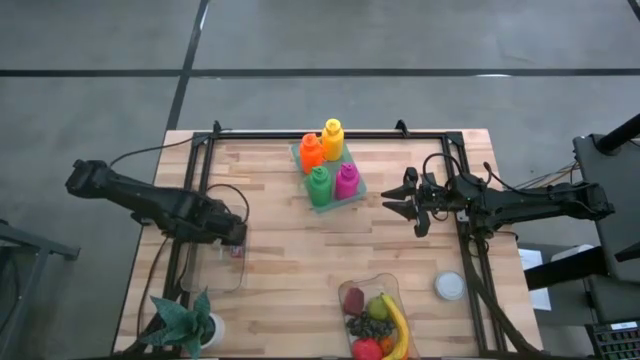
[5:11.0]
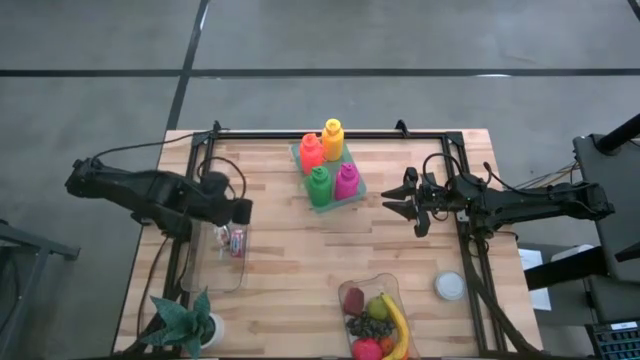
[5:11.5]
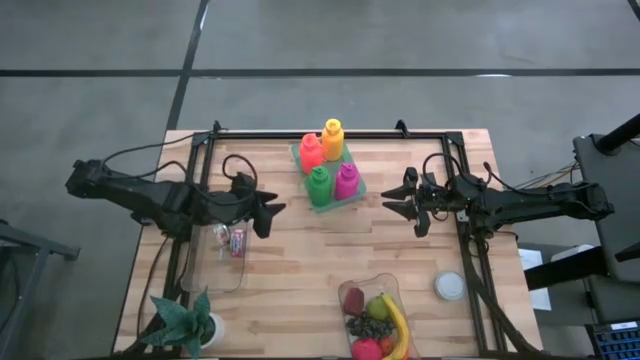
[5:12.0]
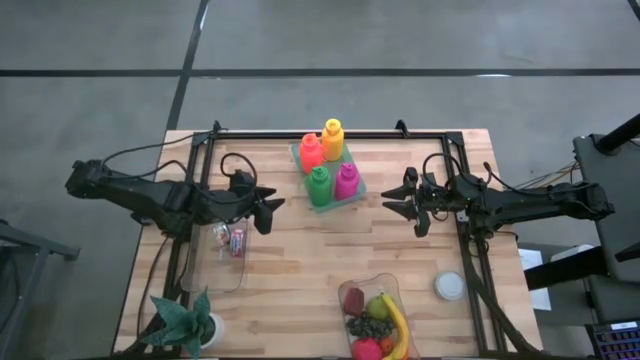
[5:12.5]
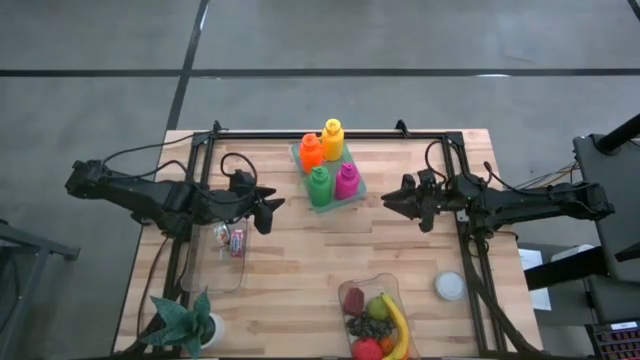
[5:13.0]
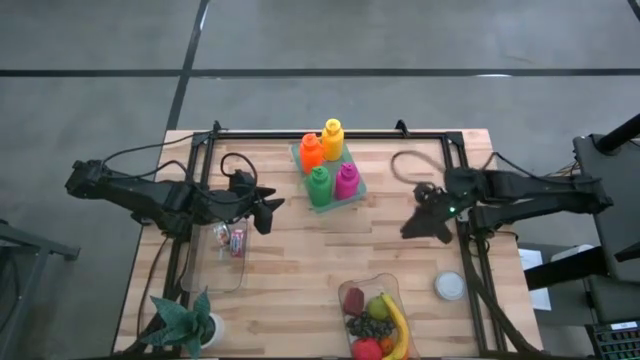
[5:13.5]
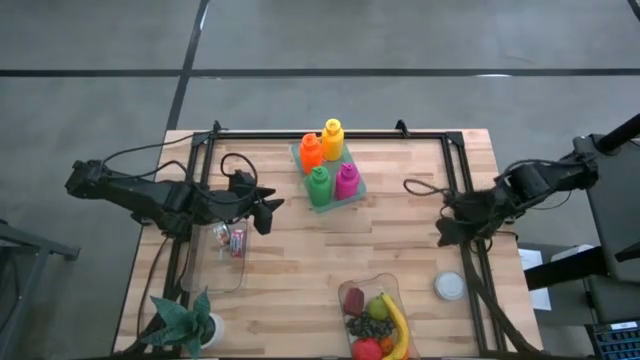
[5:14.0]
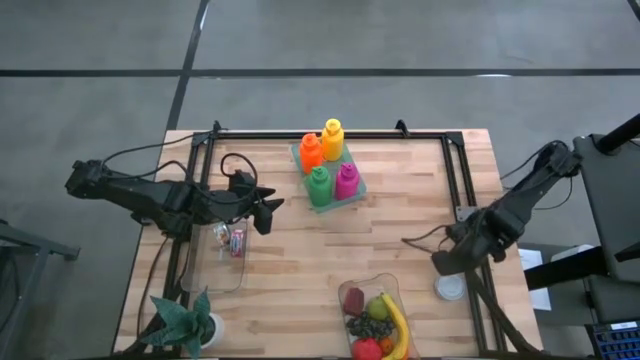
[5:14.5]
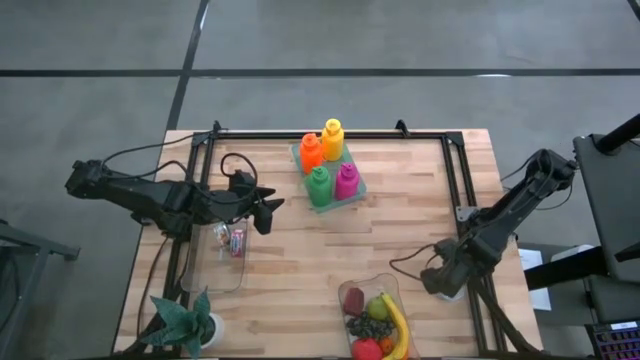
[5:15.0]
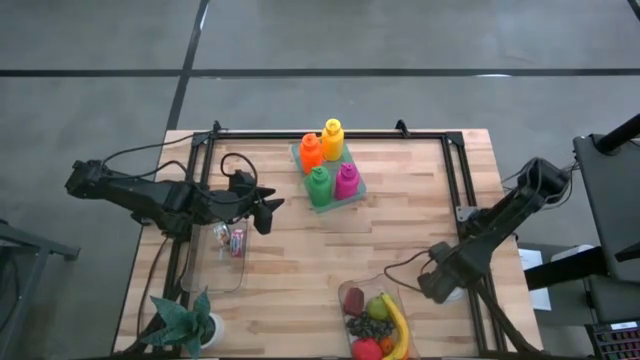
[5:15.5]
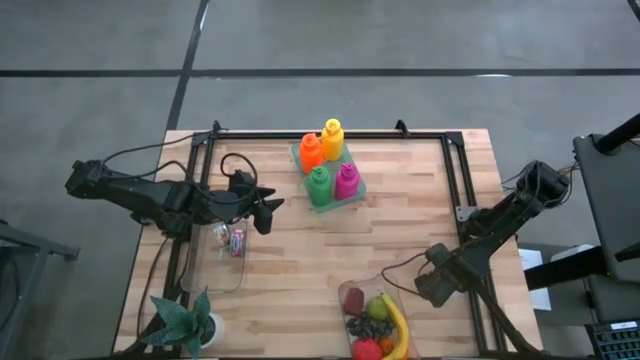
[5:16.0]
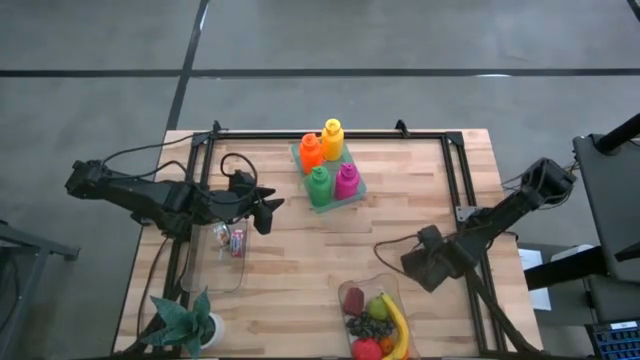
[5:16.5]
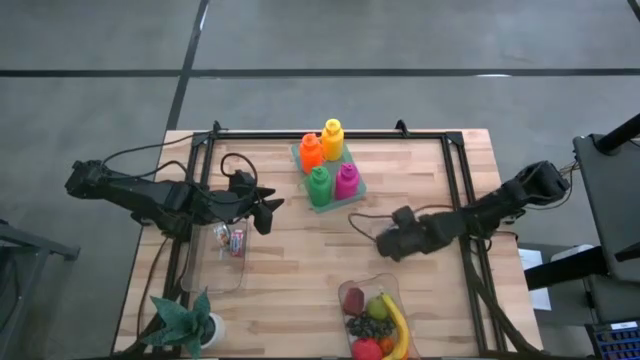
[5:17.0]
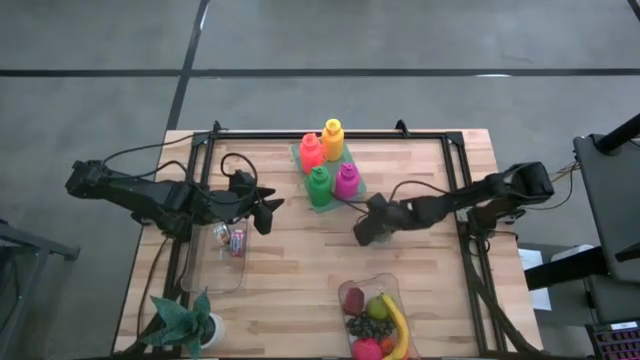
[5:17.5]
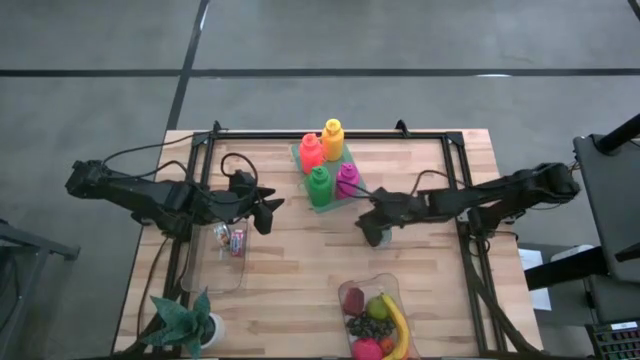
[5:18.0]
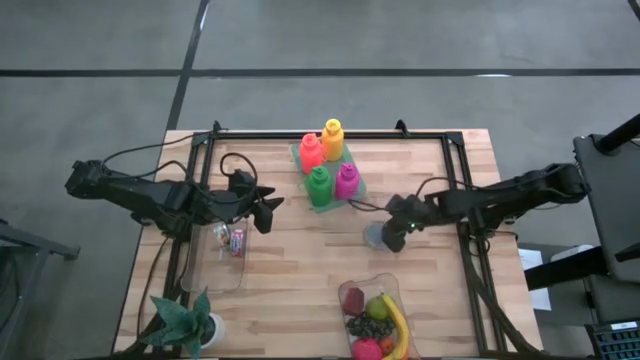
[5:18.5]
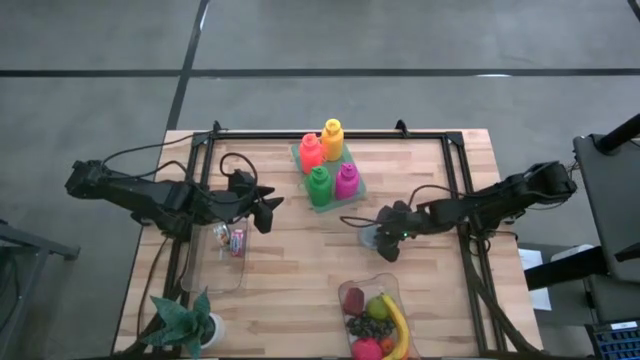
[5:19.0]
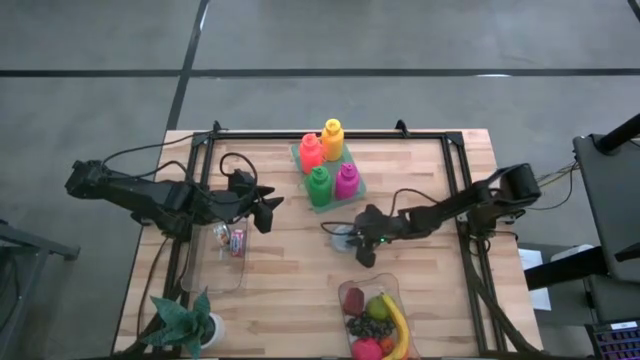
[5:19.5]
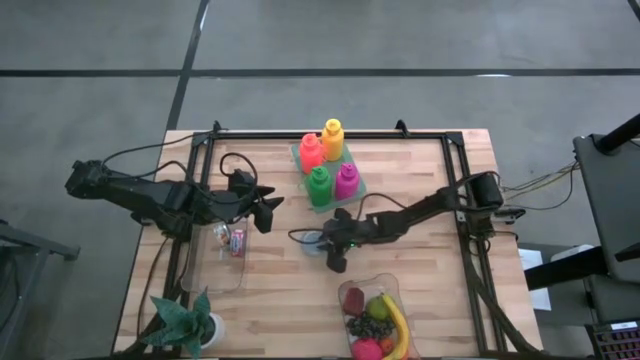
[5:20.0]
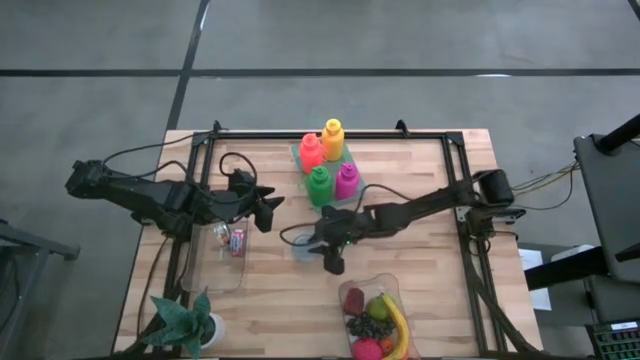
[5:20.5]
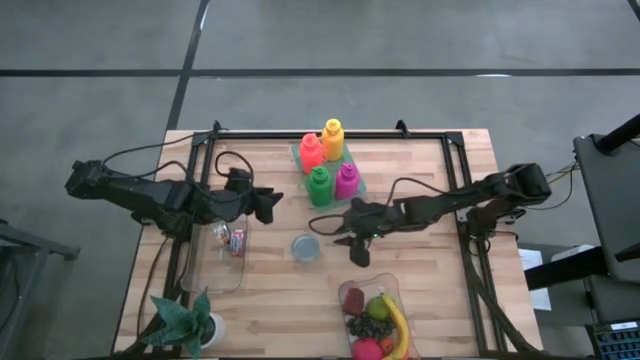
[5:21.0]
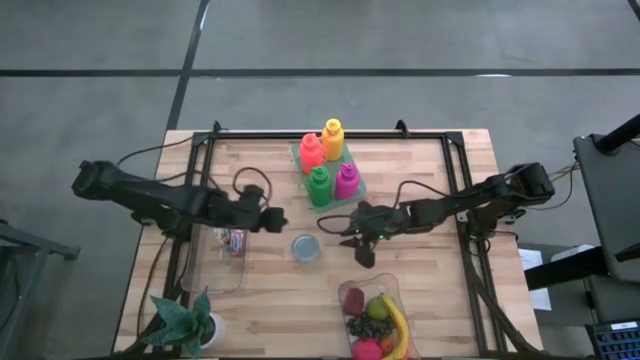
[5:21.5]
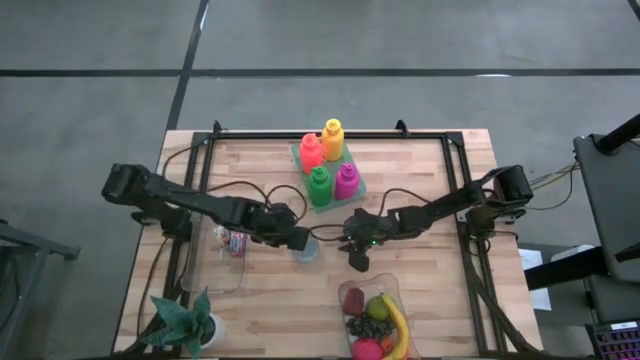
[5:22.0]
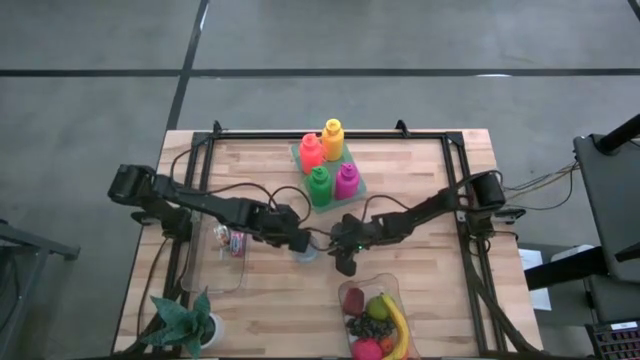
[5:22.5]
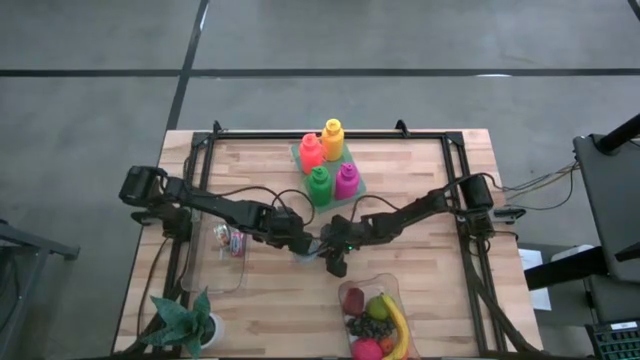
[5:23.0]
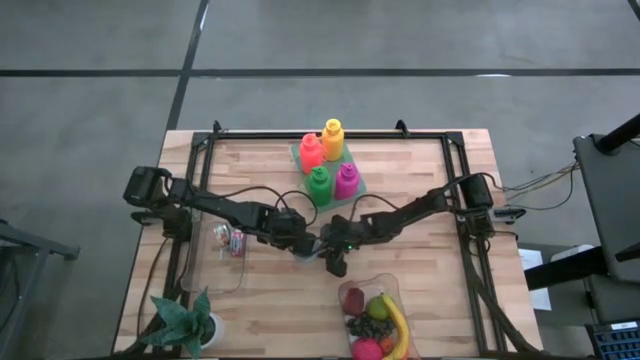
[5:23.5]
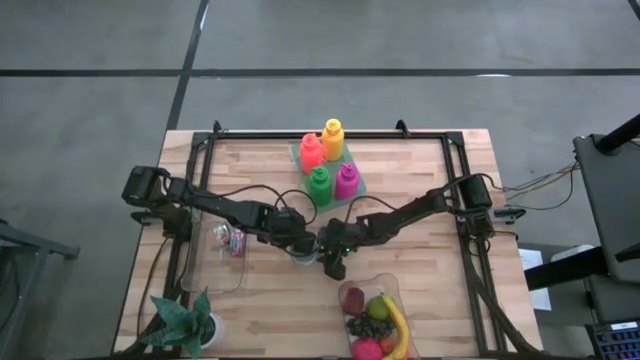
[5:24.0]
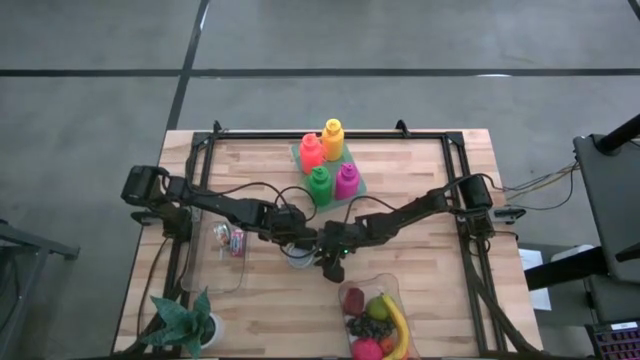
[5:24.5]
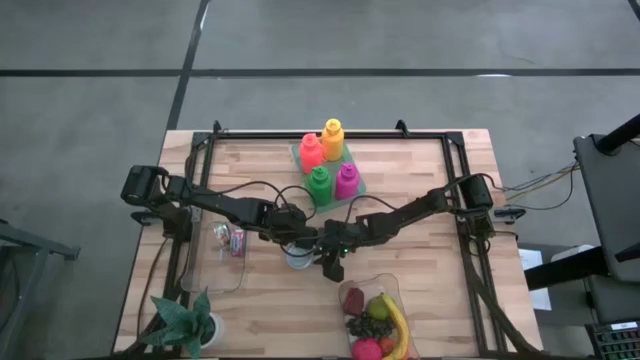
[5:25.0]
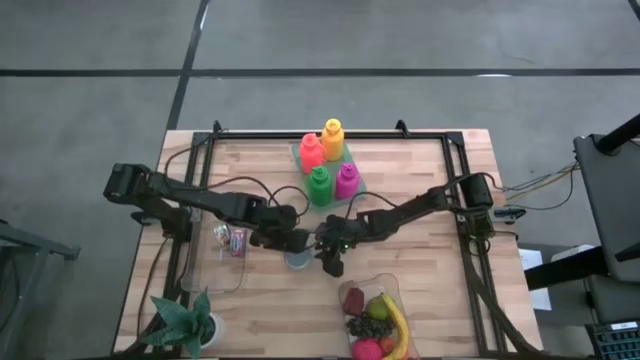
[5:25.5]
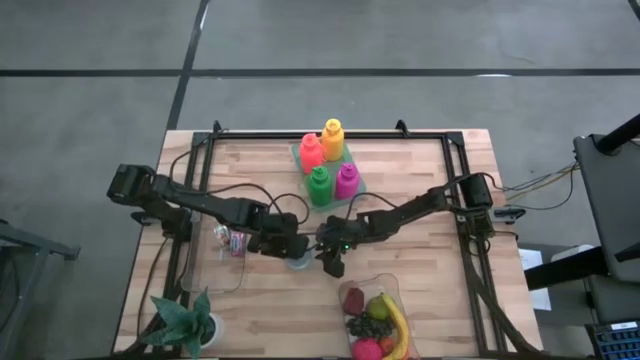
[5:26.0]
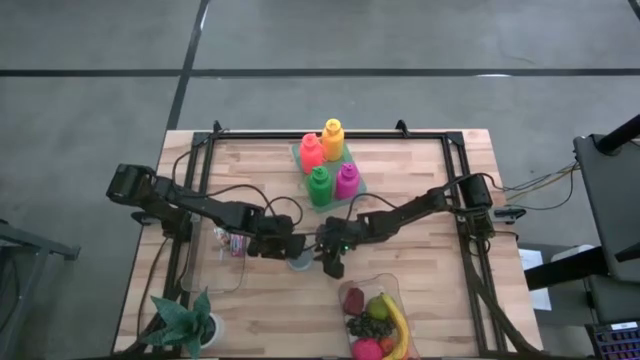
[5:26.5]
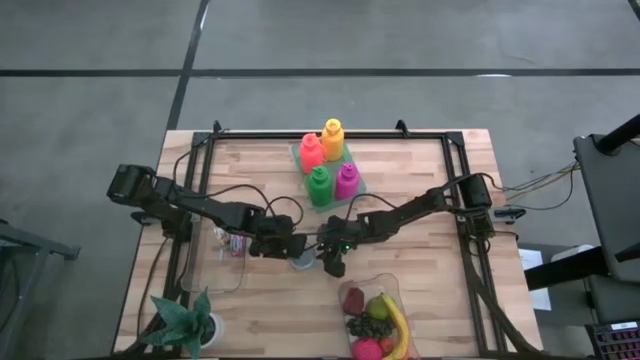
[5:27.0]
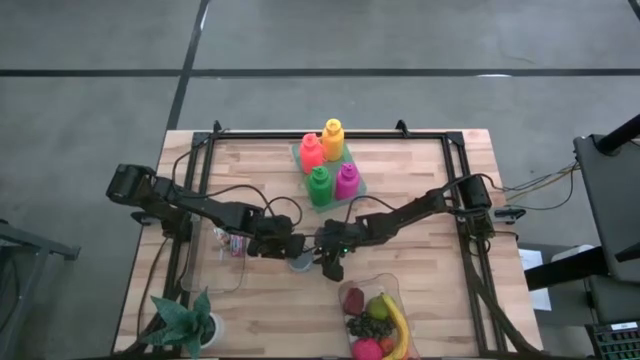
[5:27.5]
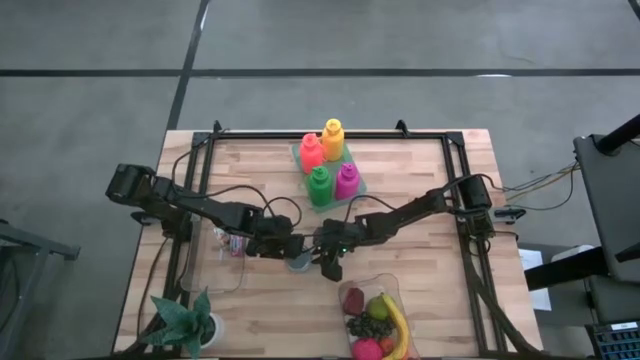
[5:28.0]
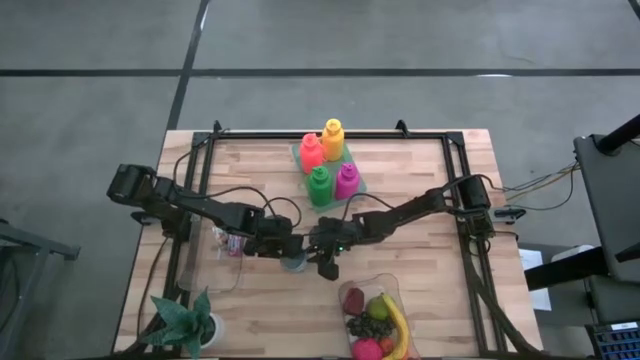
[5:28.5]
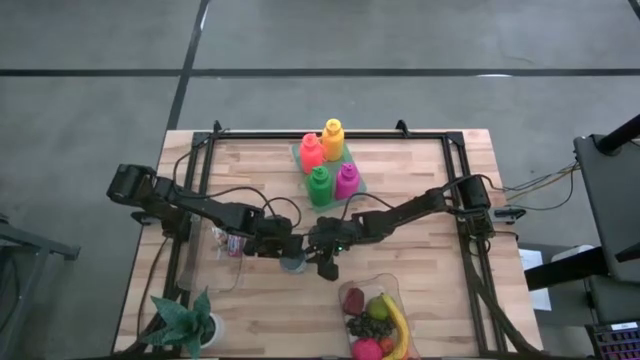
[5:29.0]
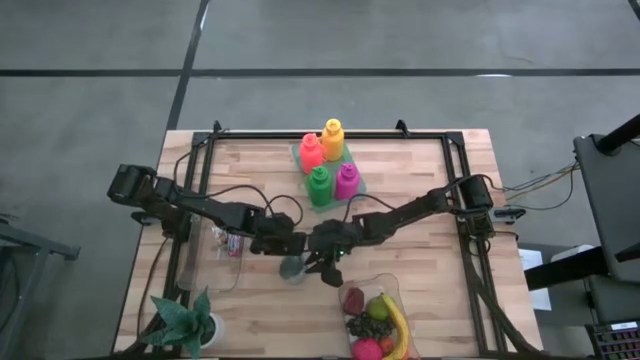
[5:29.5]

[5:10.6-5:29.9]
Task: Pick & Place Food Item
Put the green and white tuna can into the top transparent bin

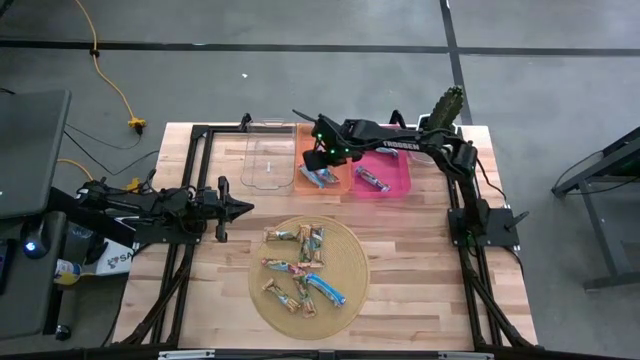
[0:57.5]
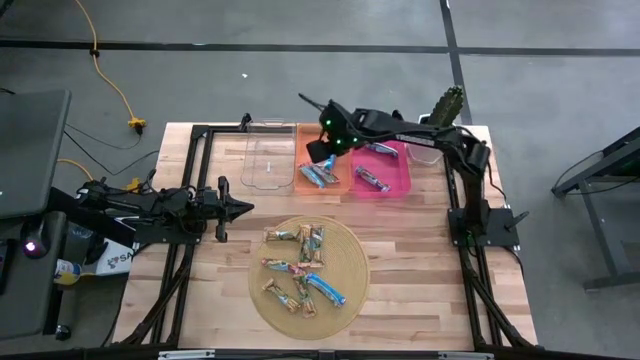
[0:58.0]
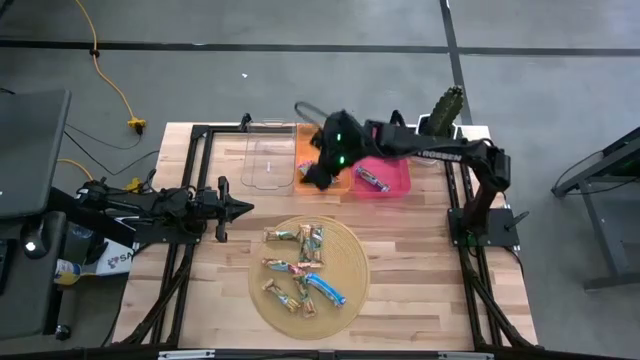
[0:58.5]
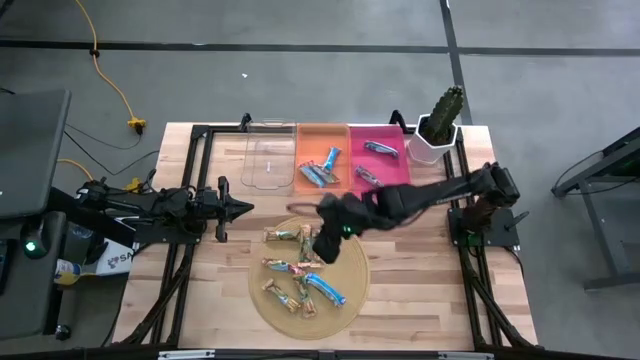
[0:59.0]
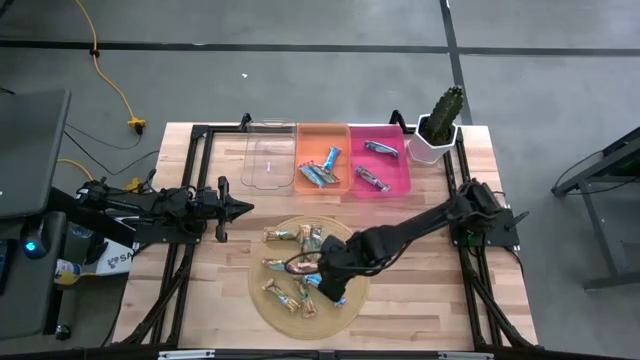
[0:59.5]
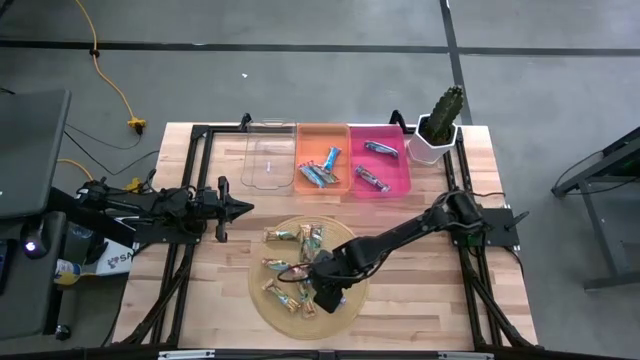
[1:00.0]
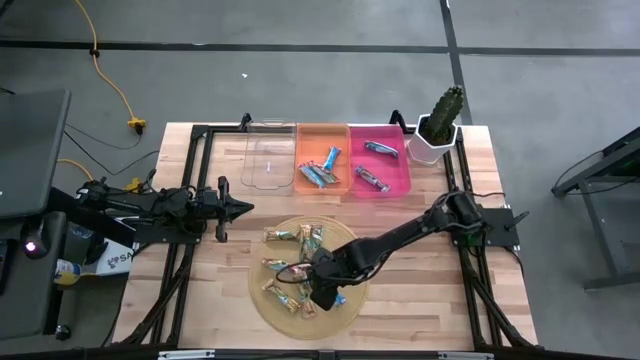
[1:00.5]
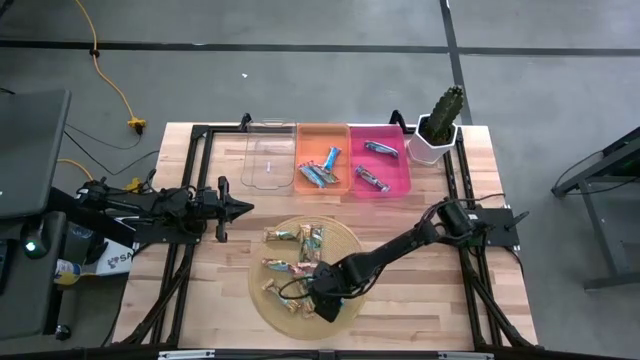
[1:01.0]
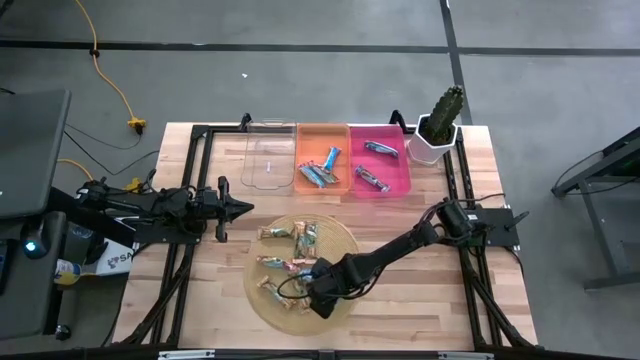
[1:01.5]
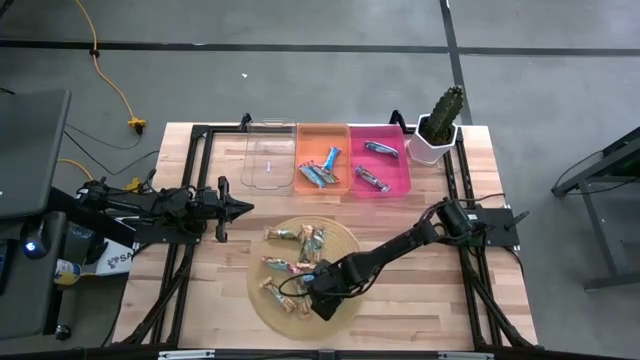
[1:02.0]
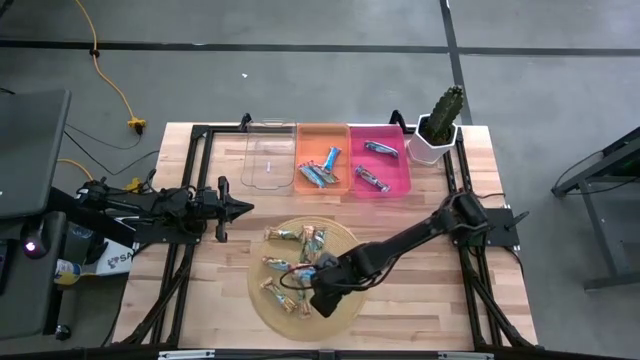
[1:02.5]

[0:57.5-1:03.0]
Task: Pick and place Granola Bars by type
Put the blue granola bar into the pink bin
